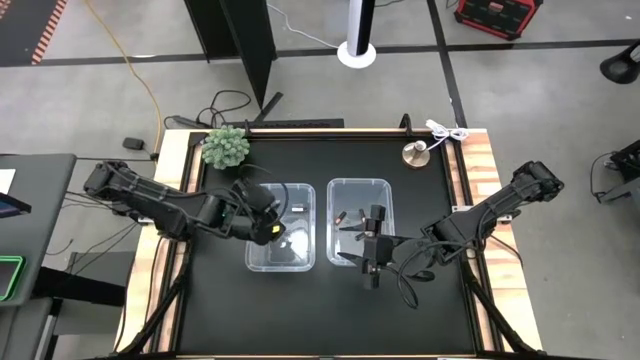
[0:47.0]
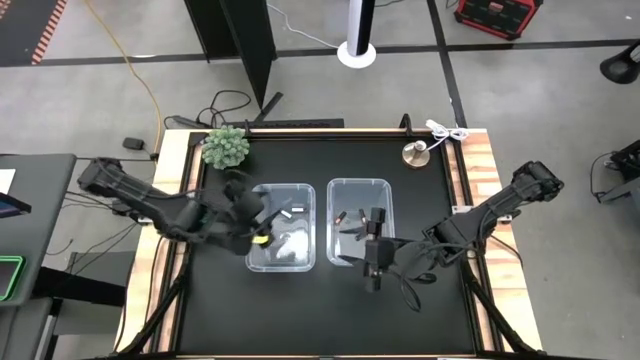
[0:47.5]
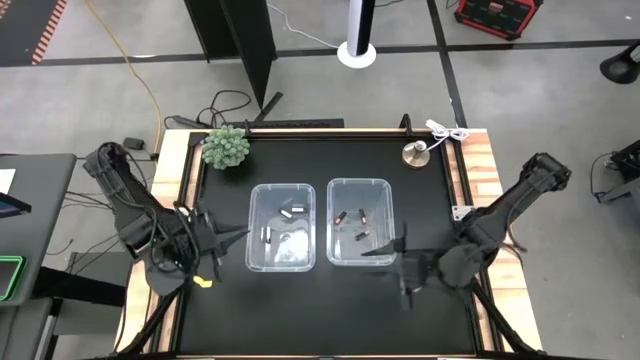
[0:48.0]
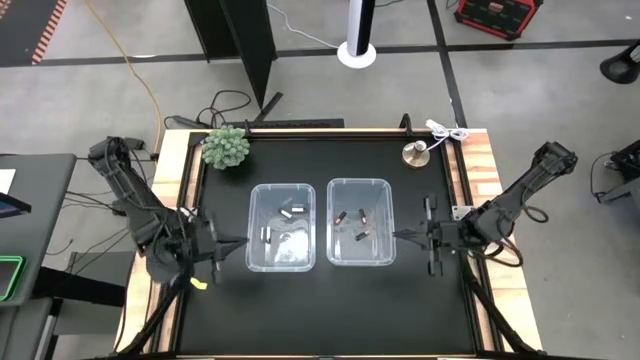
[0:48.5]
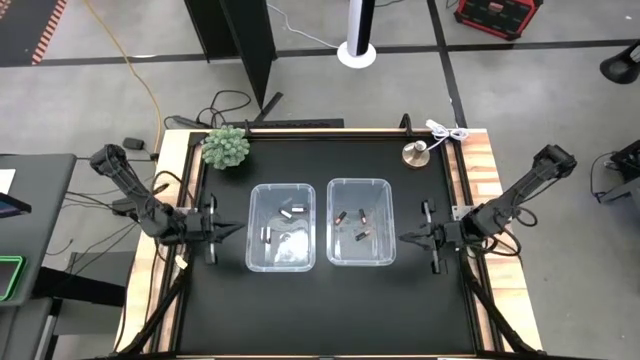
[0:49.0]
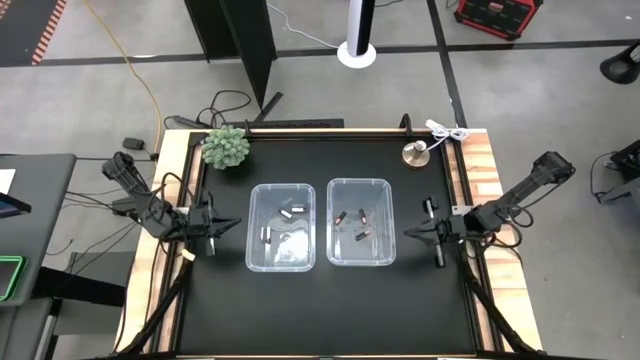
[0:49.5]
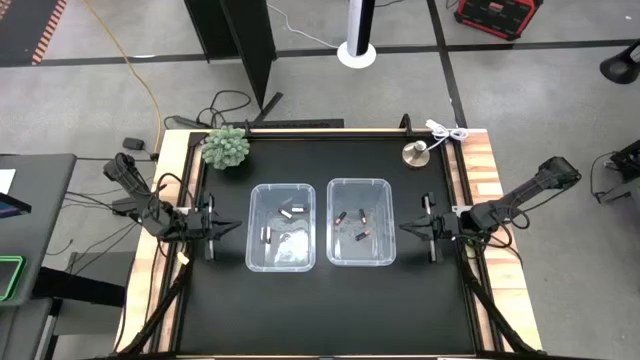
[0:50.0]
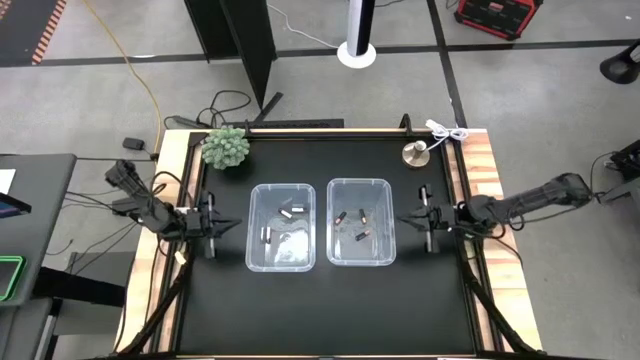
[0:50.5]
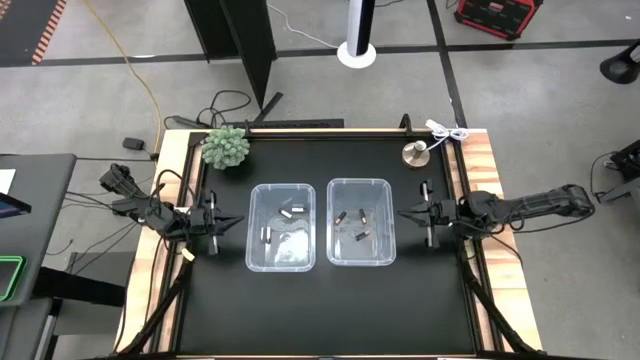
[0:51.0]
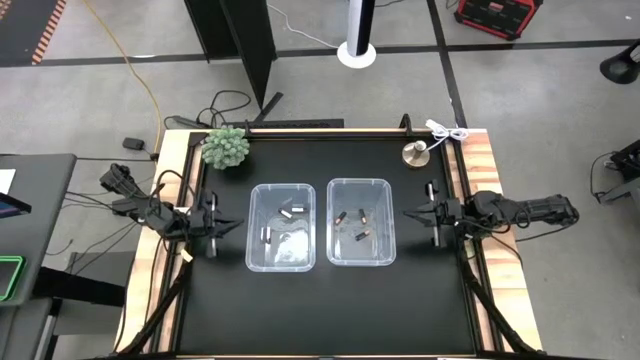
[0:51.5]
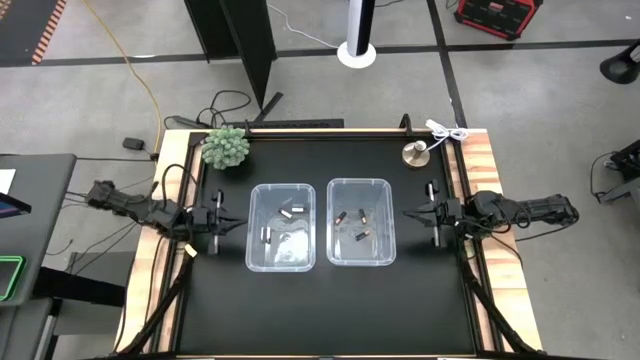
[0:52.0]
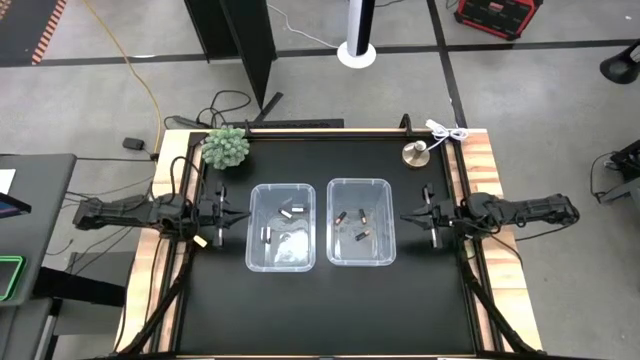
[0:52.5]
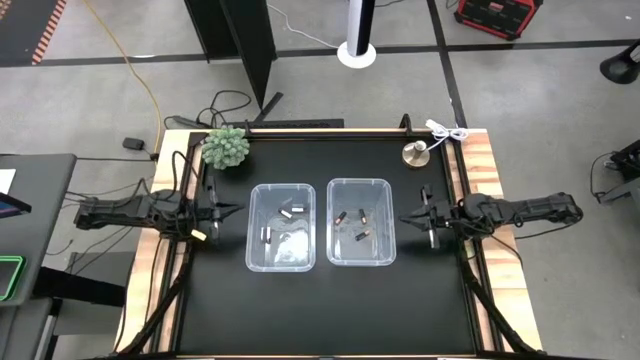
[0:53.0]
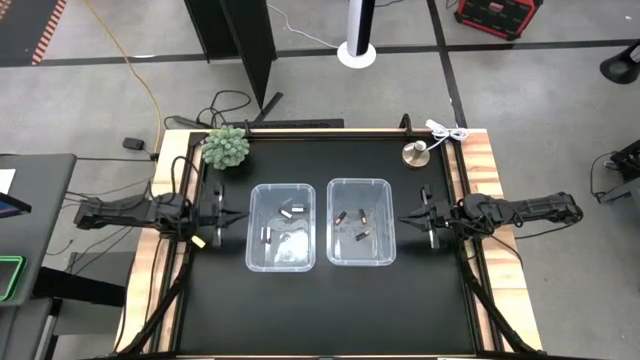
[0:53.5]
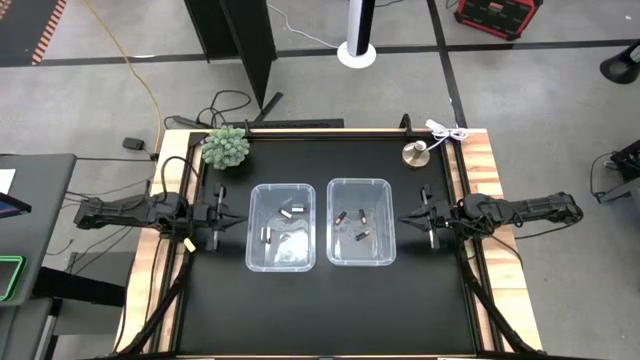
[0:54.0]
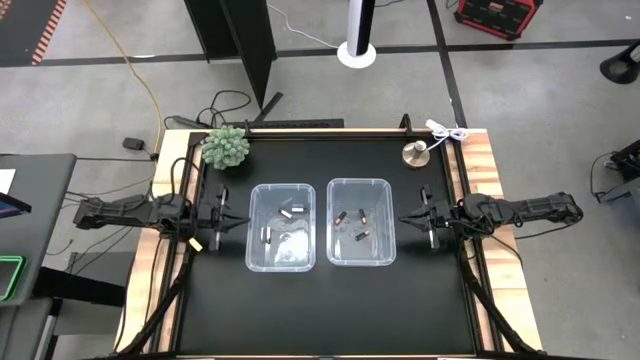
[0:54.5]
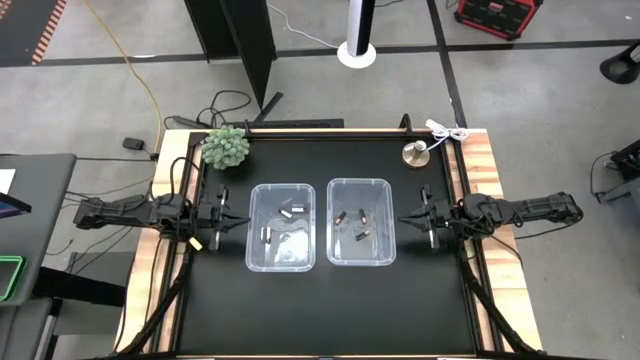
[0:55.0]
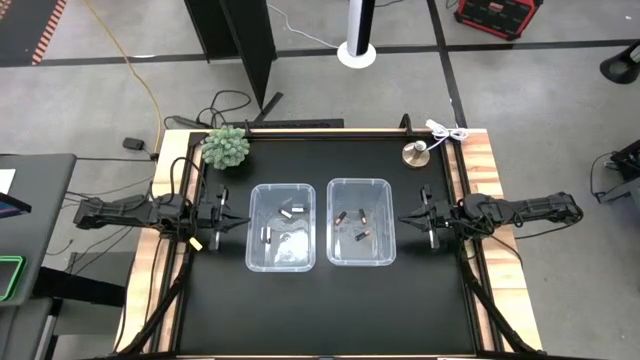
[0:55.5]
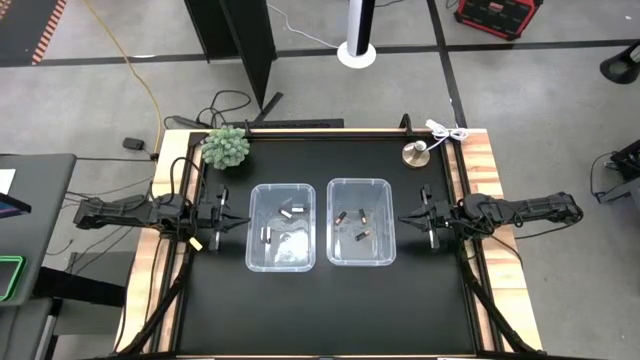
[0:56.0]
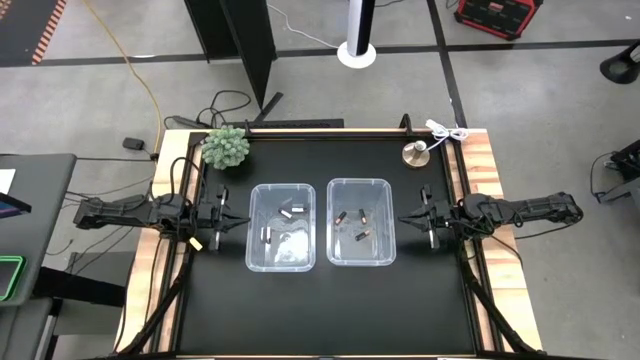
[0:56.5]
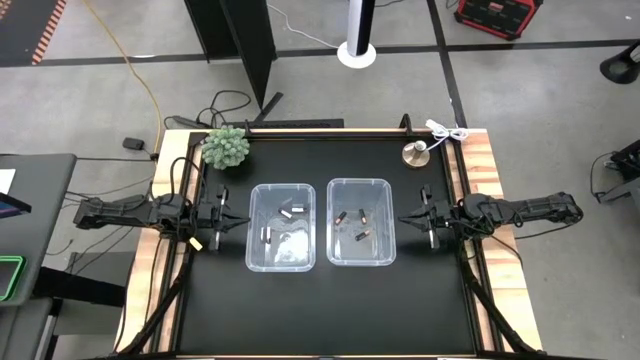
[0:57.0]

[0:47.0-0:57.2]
Task: Sort batteries
Return to Home Position

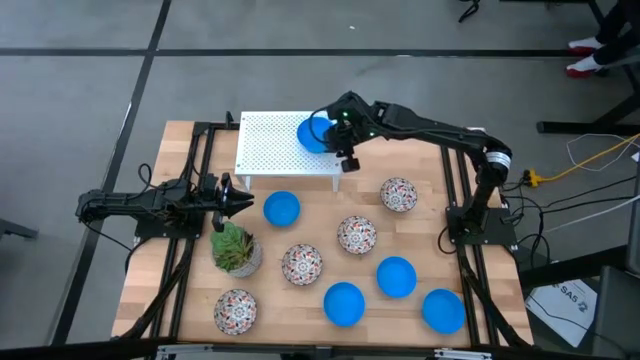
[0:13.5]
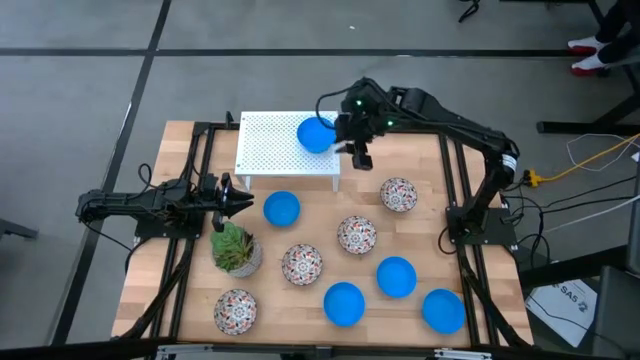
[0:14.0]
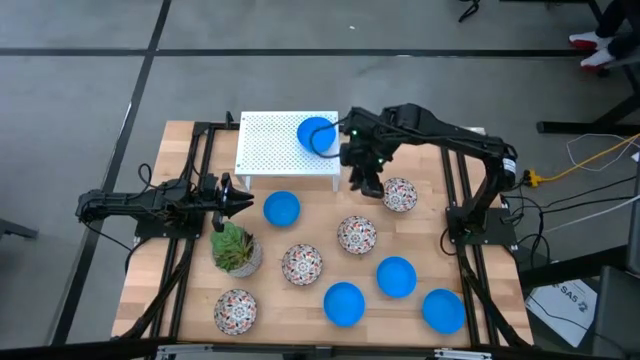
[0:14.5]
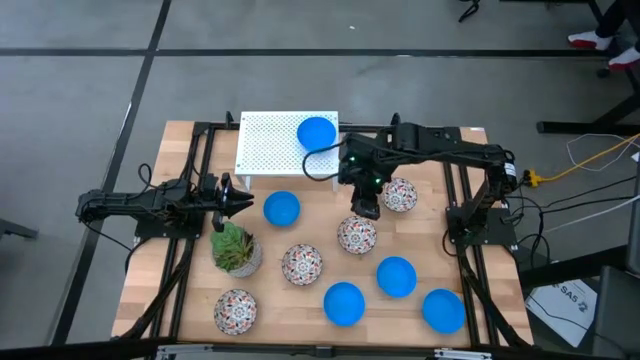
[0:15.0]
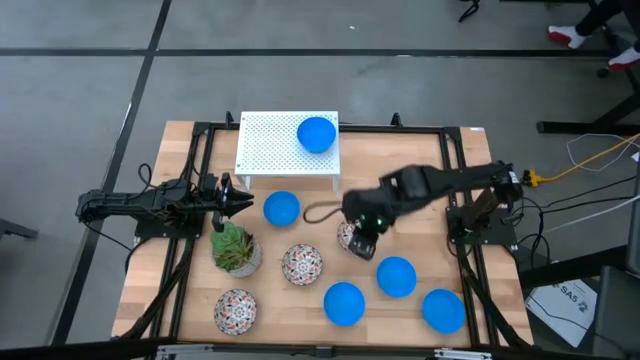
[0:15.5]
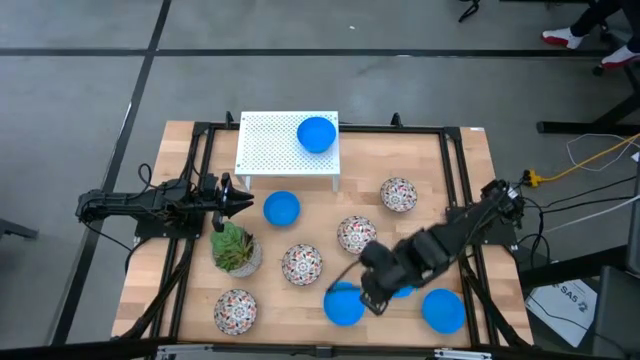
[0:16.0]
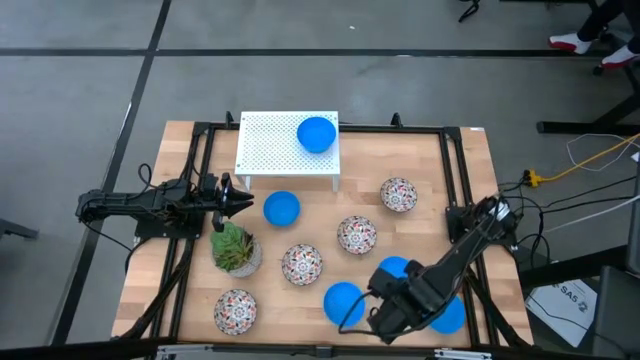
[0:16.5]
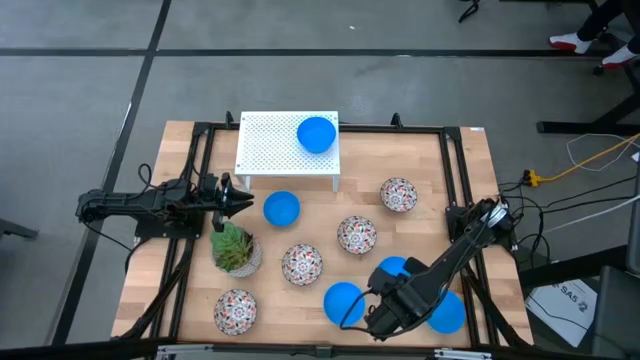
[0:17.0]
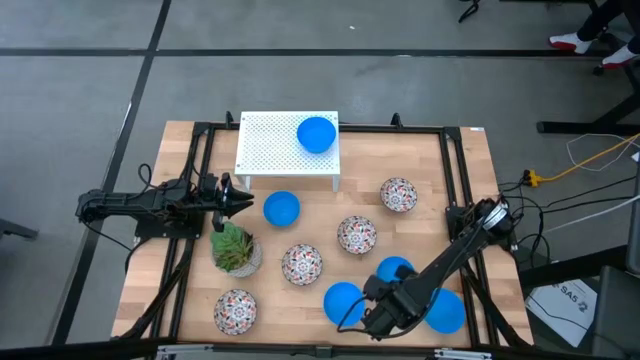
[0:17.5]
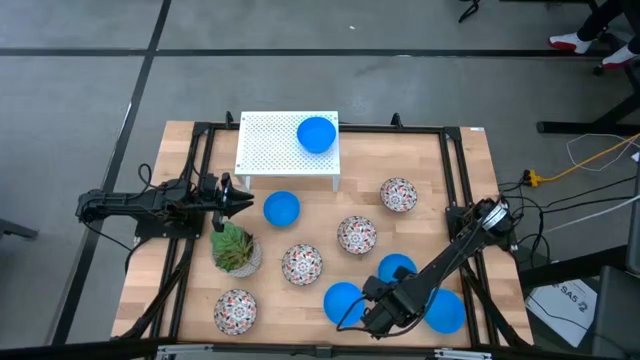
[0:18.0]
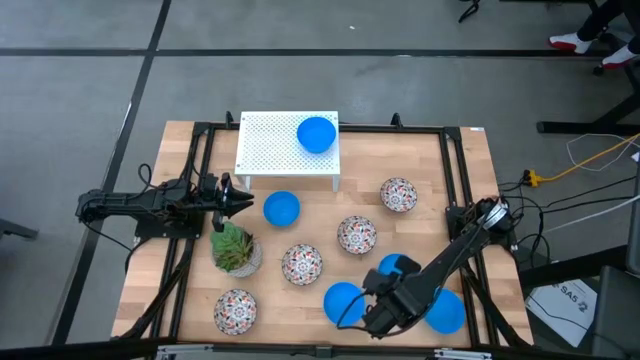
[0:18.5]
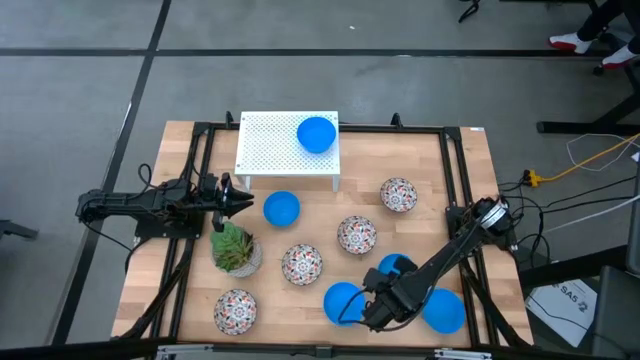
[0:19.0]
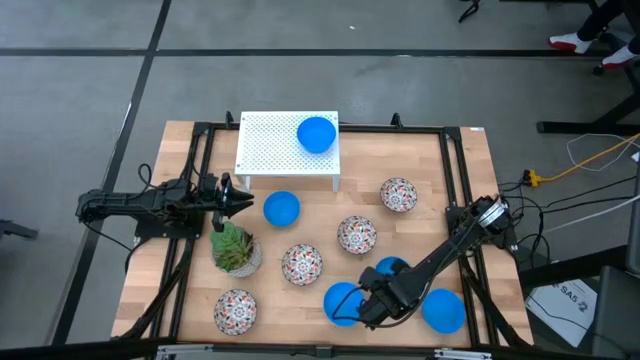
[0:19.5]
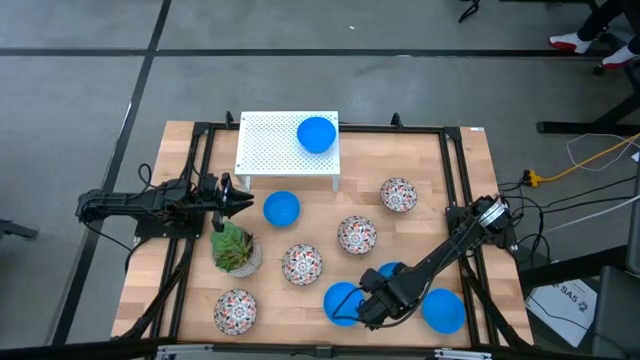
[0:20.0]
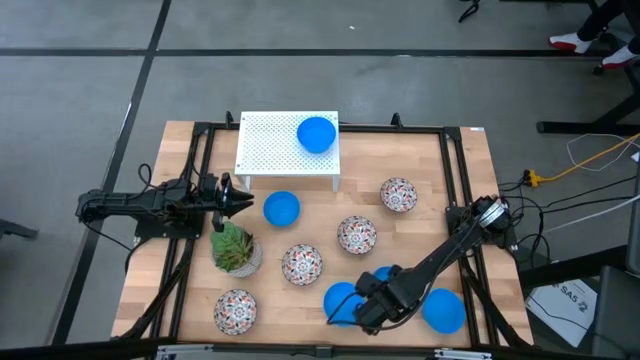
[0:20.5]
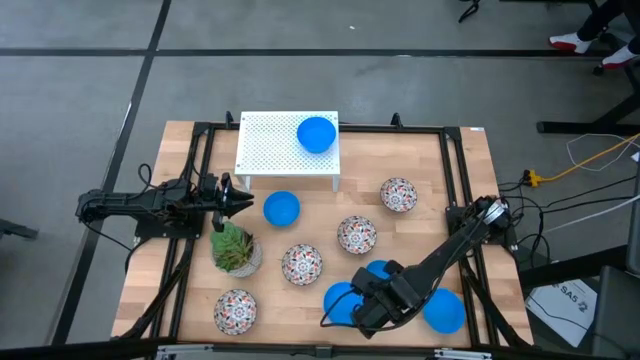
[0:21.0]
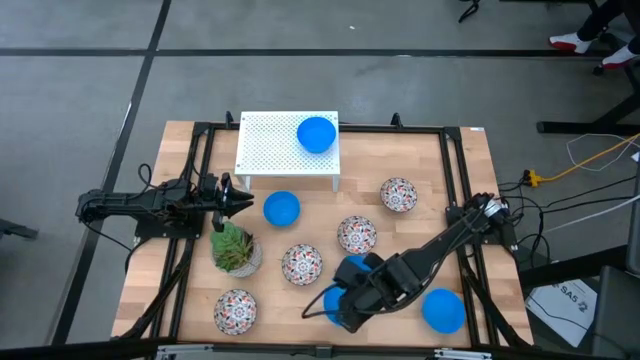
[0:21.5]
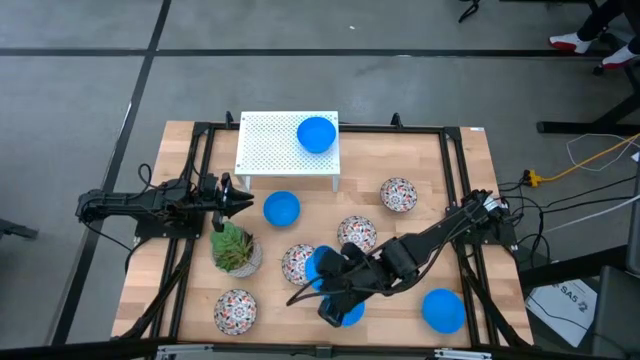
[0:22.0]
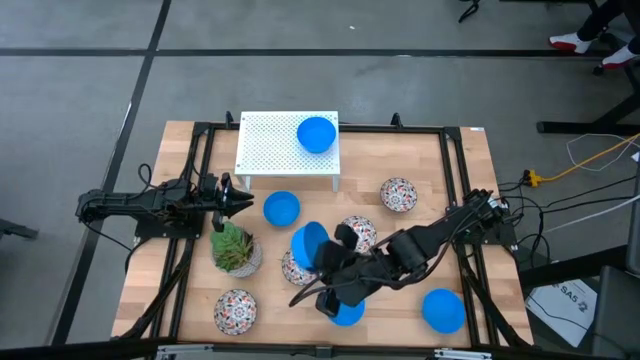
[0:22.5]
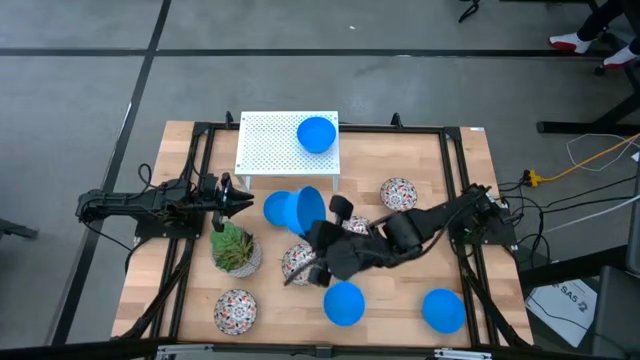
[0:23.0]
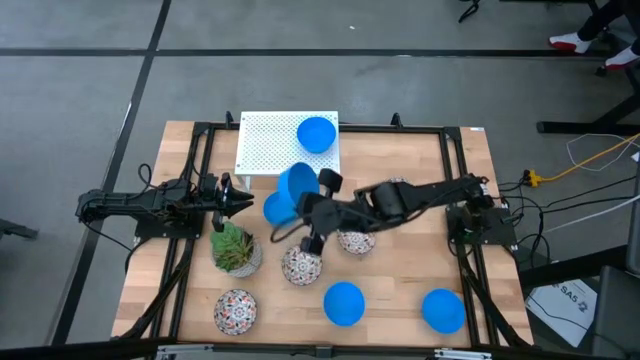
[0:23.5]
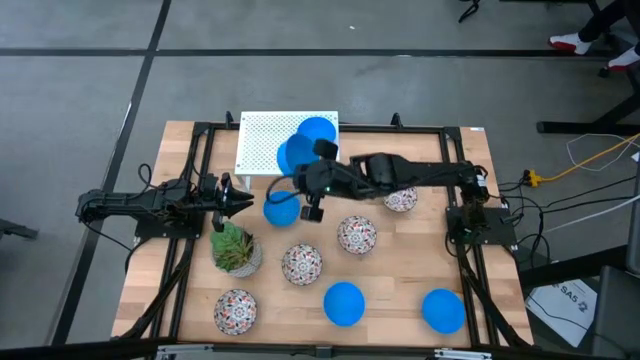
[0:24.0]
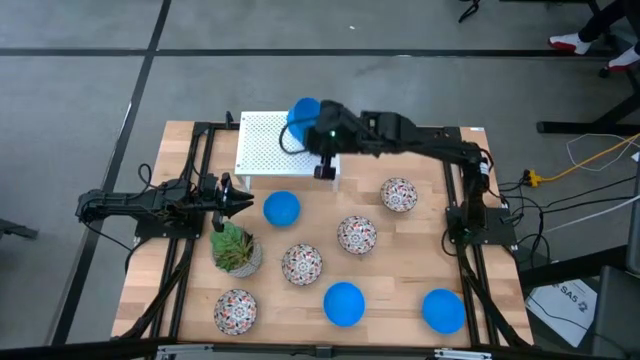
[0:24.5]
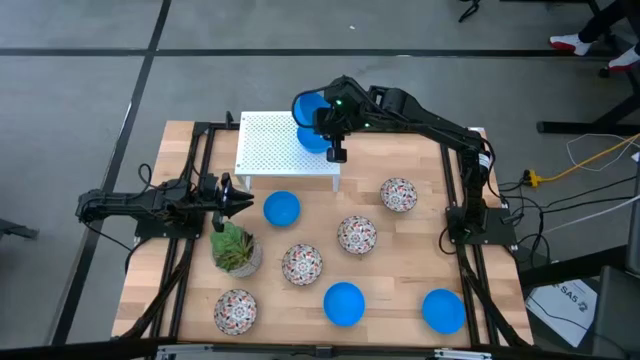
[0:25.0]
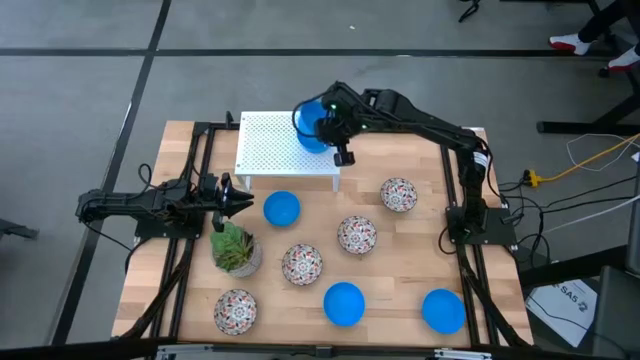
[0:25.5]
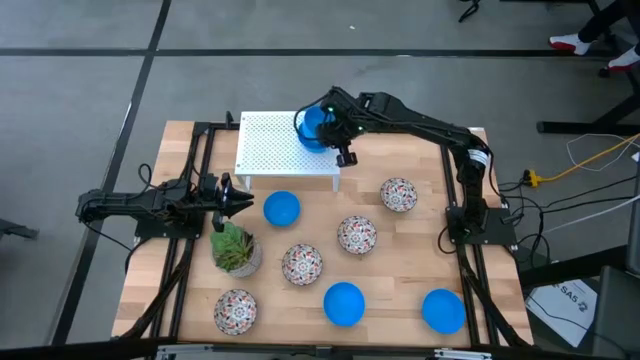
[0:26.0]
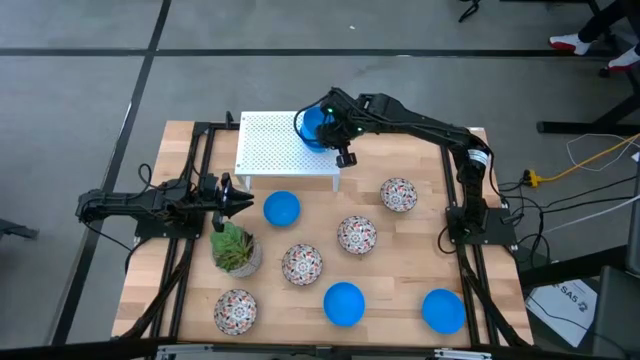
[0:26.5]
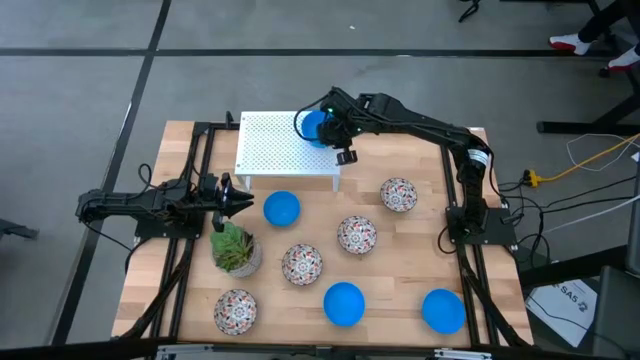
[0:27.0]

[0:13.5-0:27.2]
Task: Pick & Place Mini bowls
Stack the blue bowl on the blue bowl on the shelf
